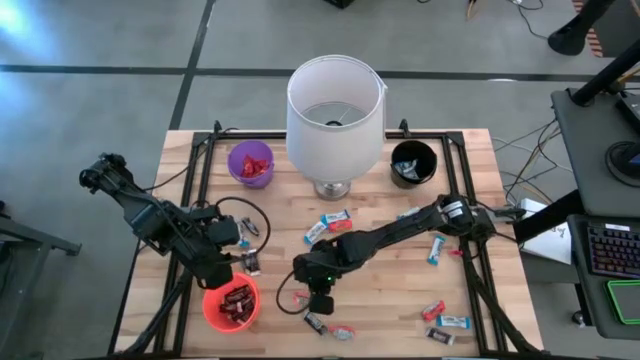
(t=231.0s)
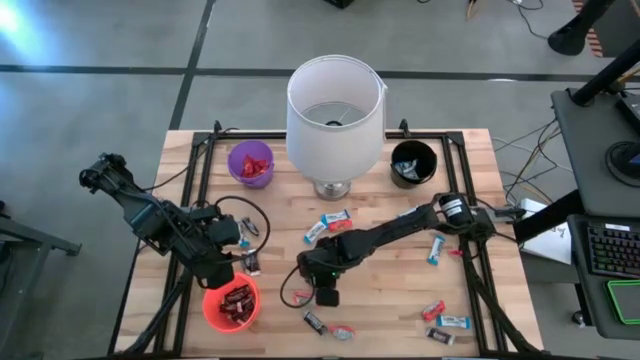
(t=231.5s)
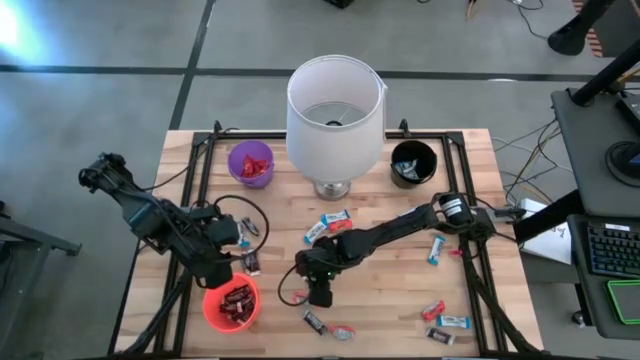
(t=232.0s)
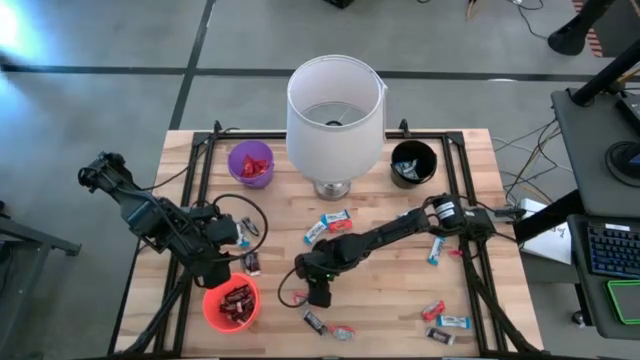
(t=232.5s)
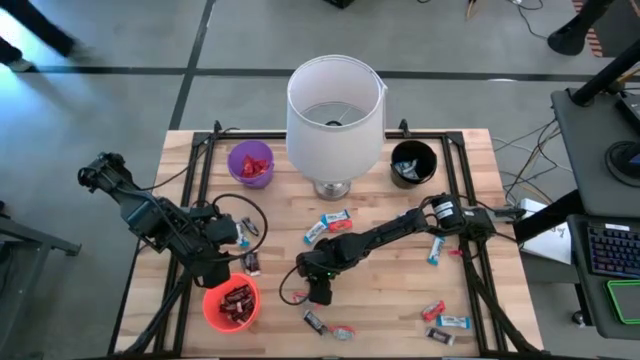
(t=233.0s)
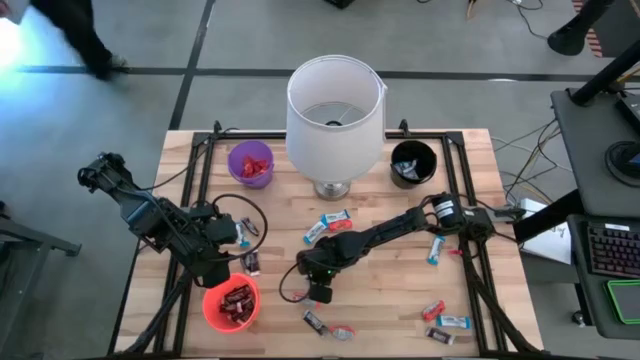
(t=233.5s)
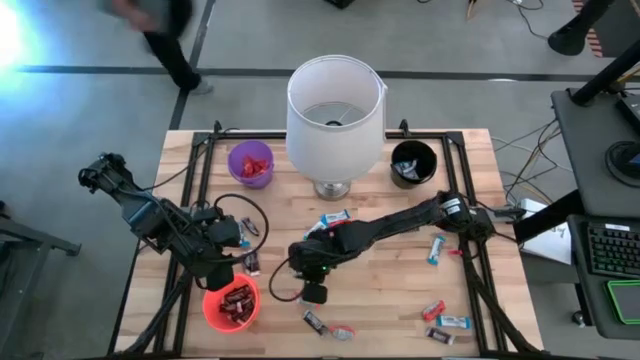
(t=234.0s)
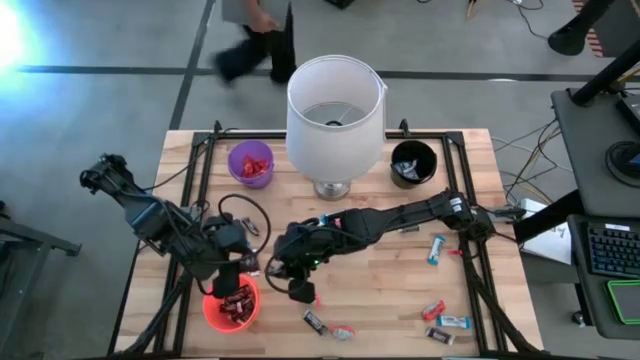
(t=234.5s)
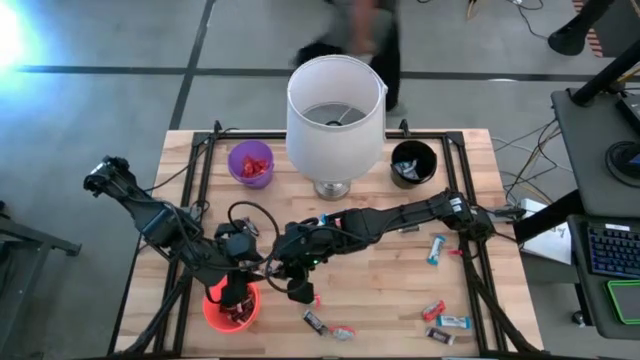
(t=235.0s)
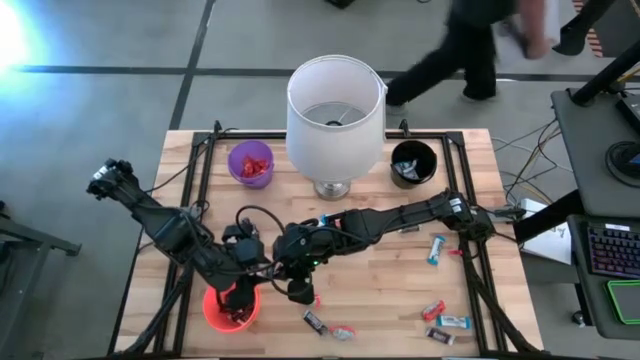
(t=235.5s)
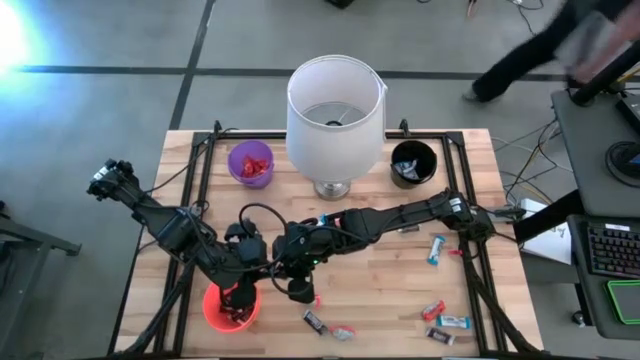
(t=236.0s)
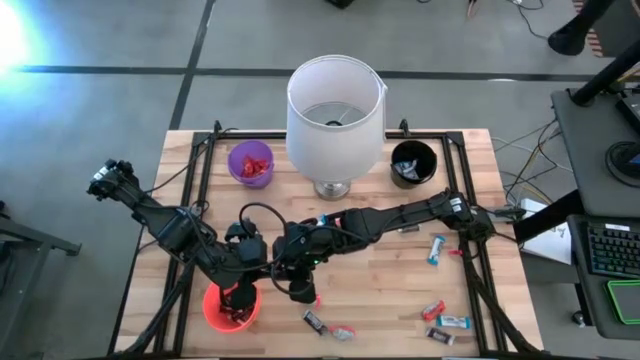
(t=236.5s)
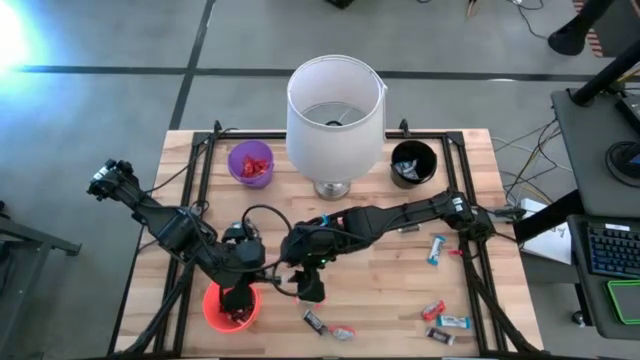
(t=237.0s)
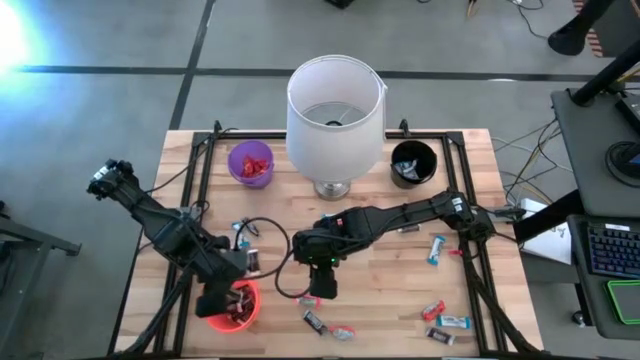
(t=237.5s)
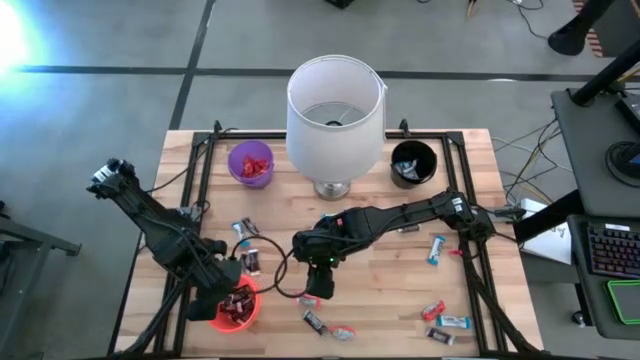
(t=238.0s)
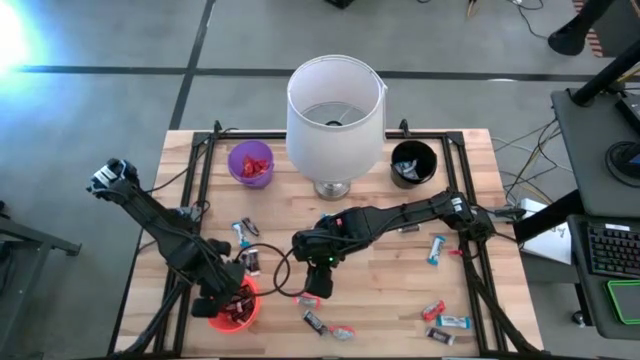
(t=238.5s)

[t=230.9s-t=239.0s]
Task: Sort candy
Put the black chocolate into the orange bucket

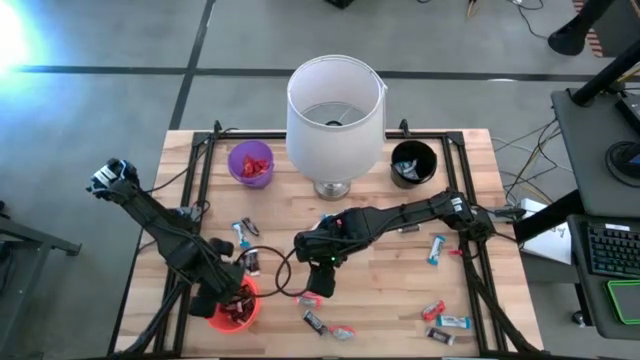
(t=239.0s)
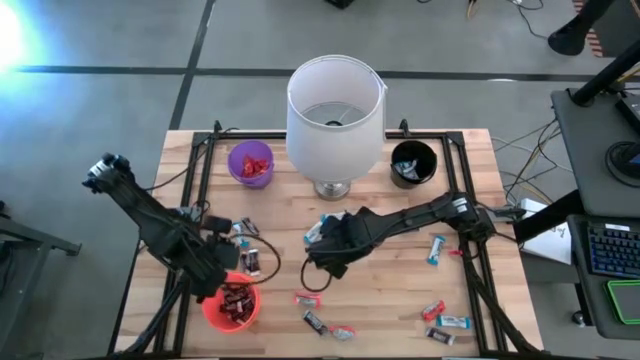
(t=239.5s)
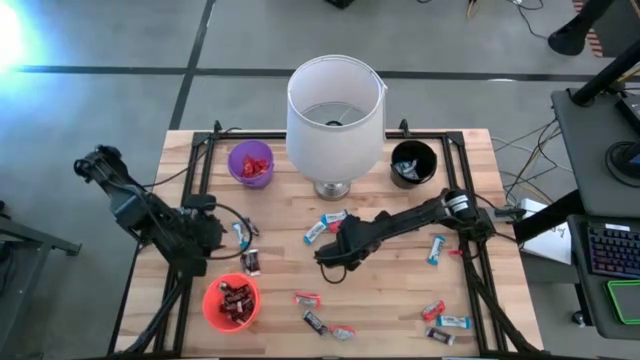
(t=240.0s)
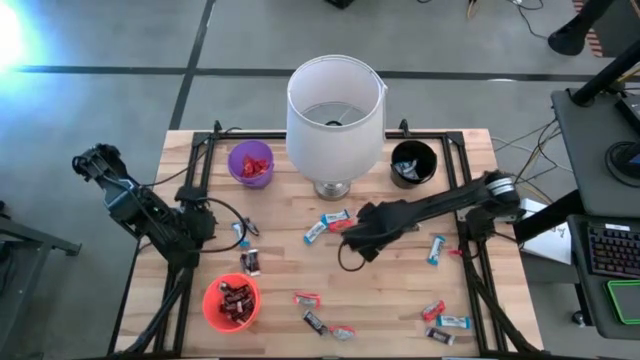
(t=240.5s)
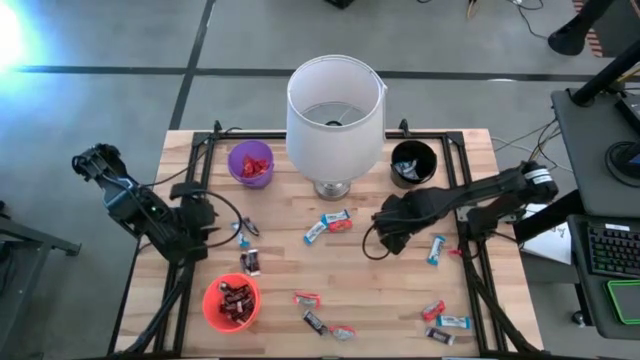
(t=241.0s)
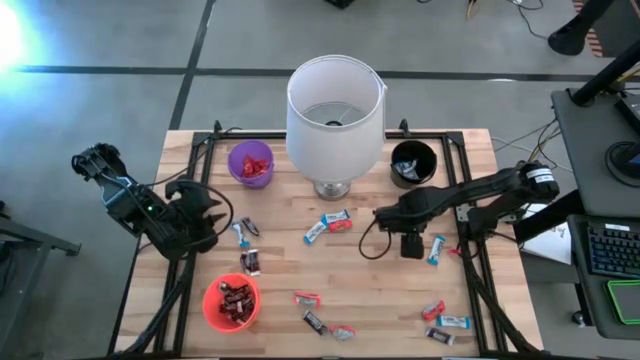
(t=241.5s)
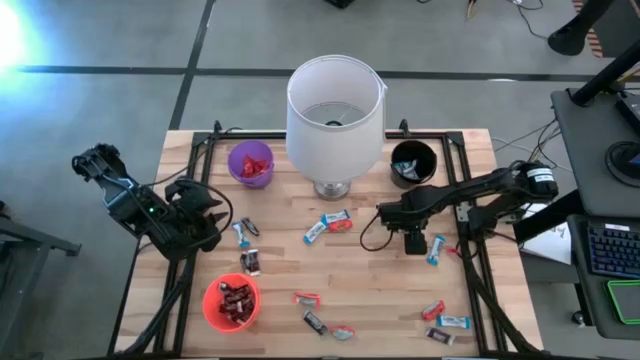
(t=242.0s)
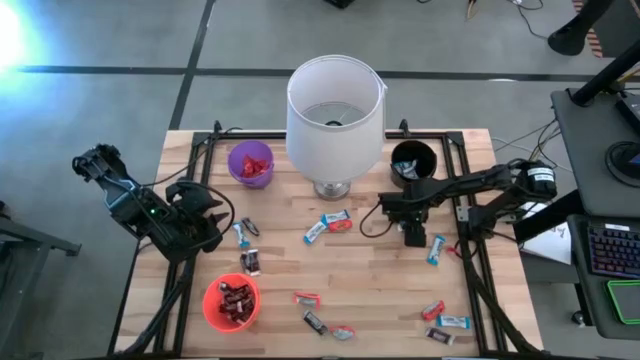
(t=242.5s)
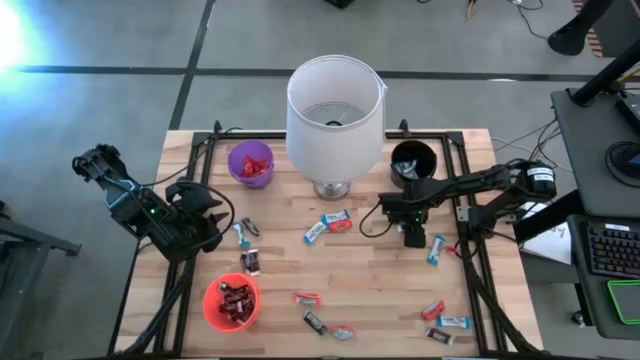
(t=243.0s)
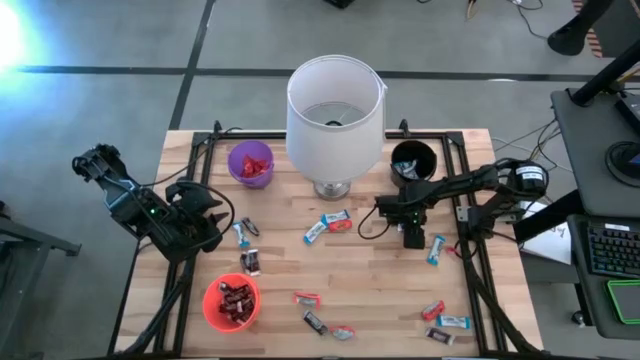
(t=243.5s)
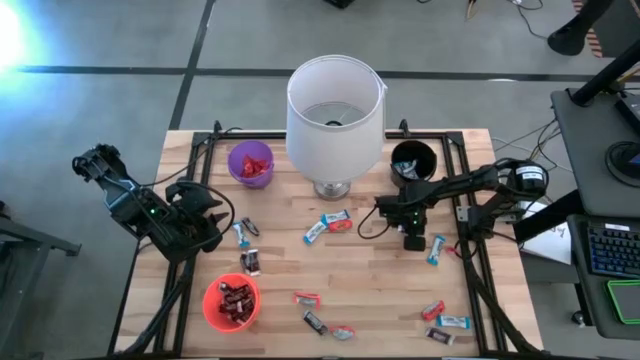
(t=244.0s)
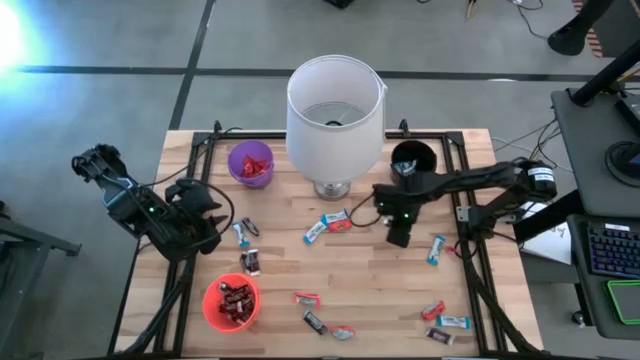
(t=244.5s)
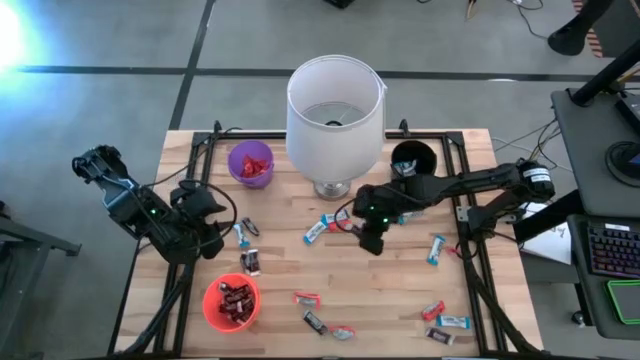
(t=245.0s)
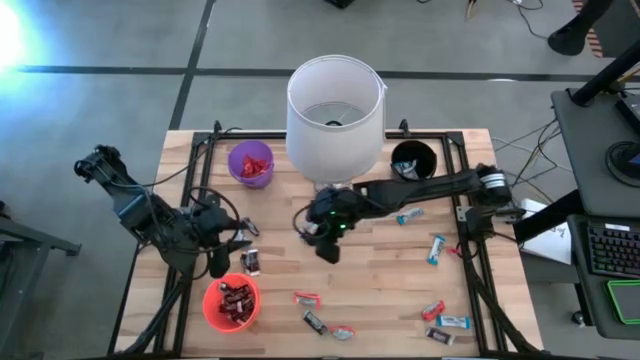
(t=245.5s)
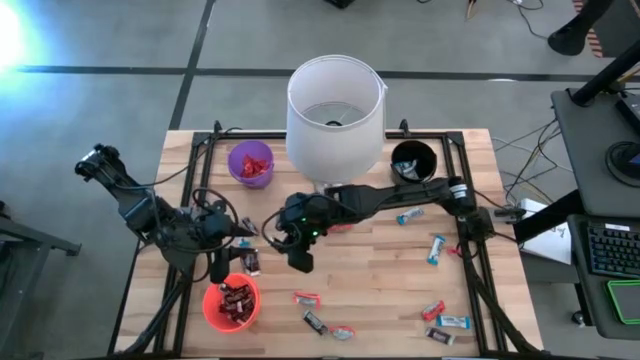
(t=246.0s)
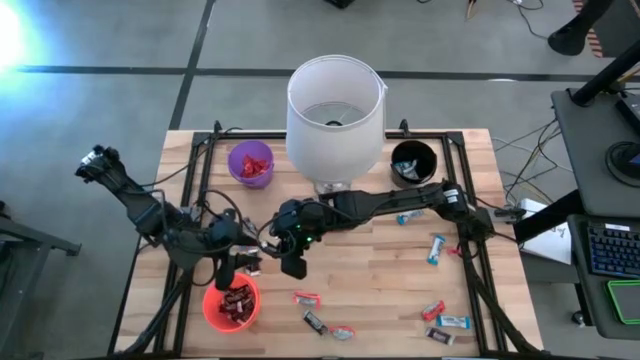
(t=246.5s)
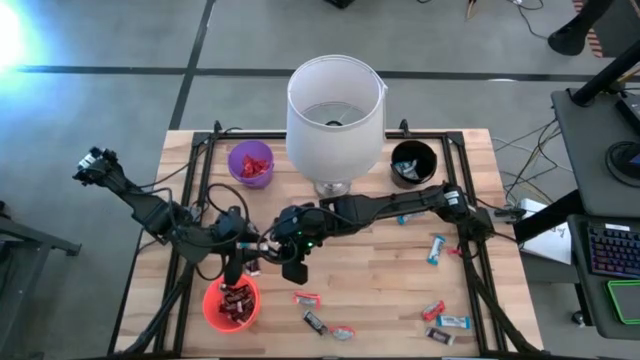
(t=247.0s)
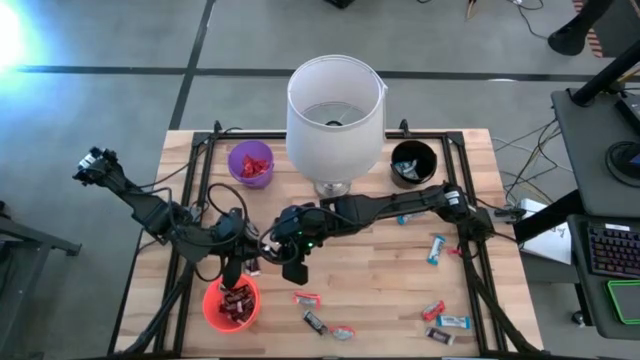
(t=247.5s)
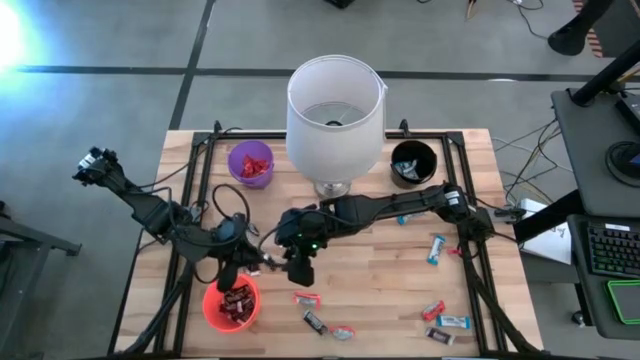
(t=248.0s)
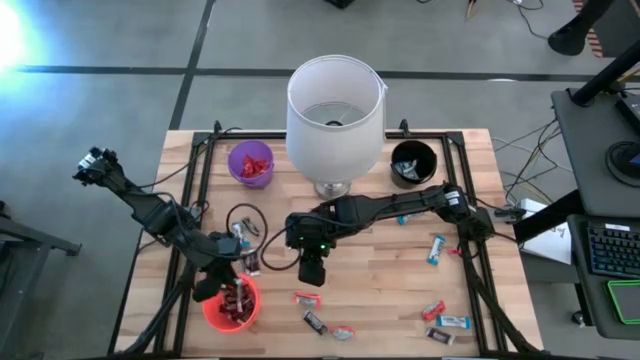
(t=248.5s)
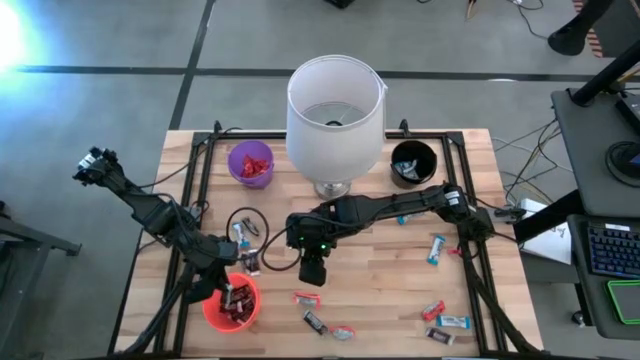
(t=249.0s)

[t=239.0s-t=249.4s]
Put the black chocolate into the orange bucket

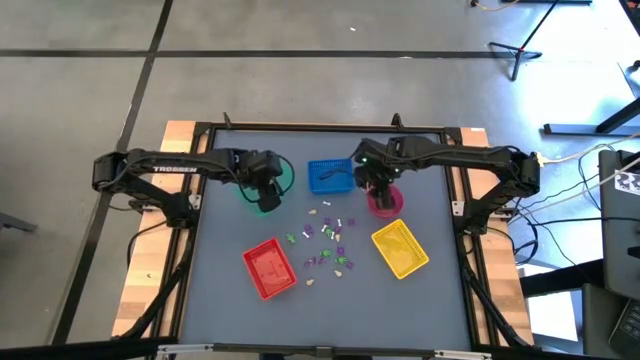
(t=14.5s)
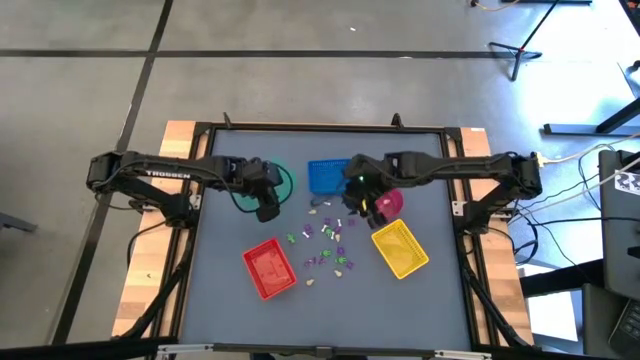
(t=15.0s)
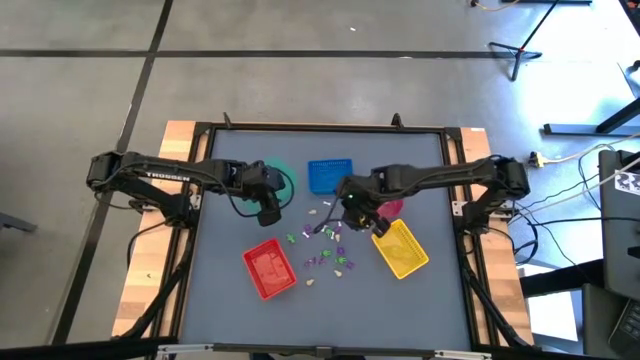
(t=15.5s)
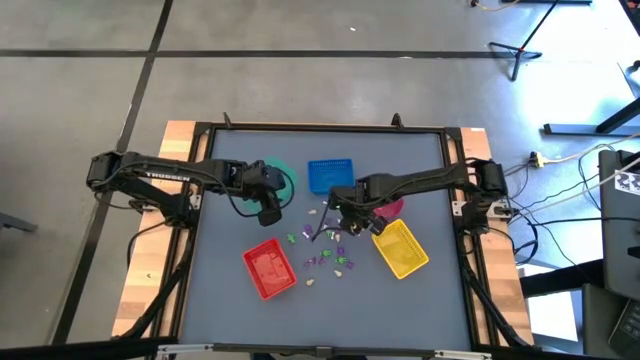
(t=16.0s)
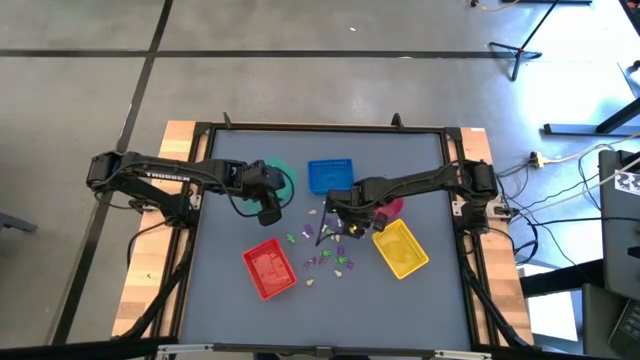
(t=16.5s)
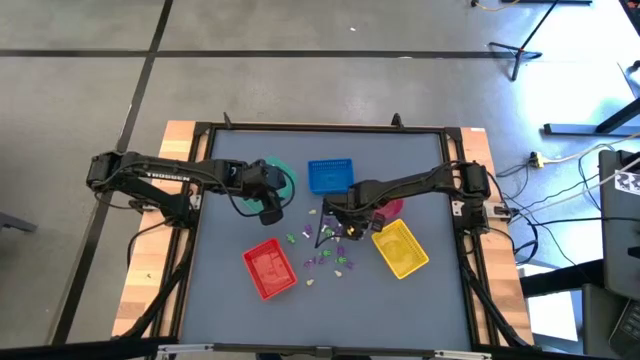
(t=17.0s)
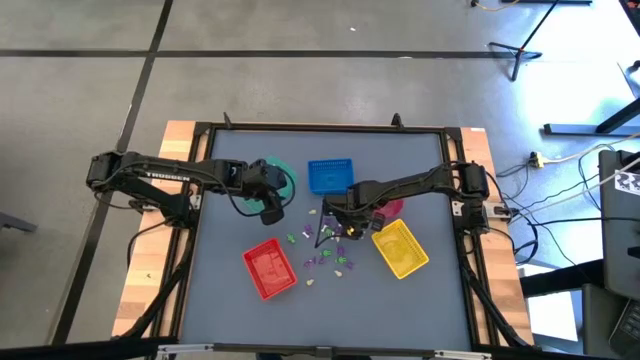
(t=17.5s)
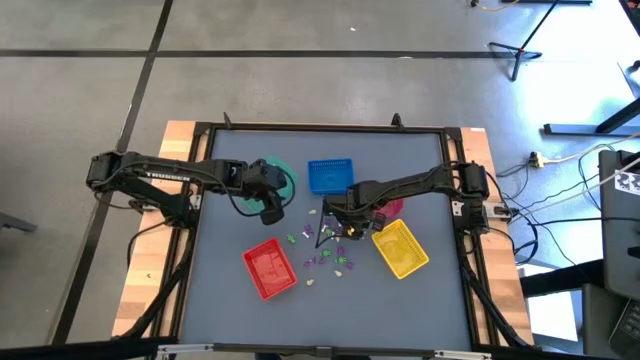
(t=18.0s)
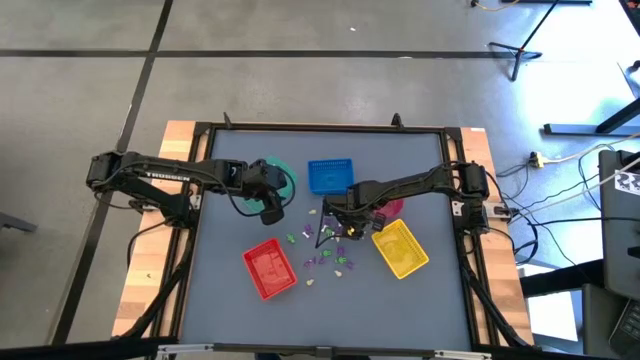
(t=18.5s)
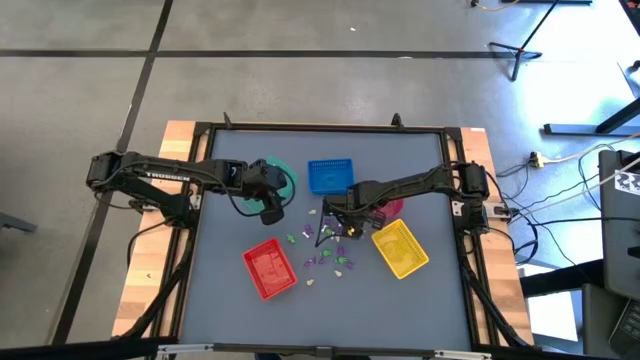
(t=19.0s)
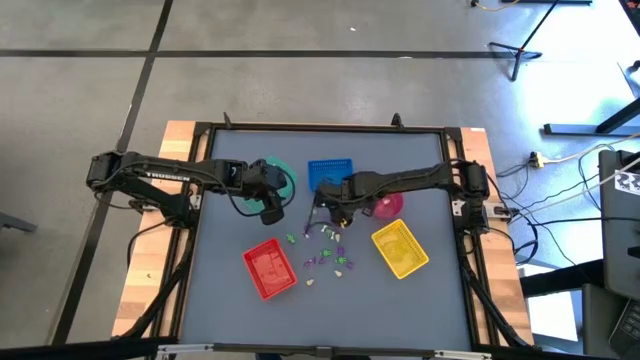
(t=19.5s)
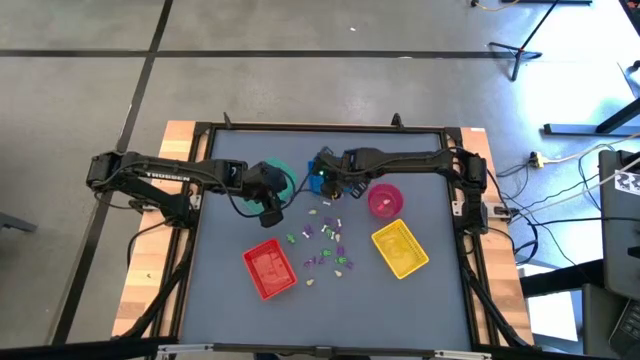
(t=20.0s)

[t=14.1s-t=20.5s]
Task: Sort Halloween decoration
Put the purple spider toy into the blue bin
